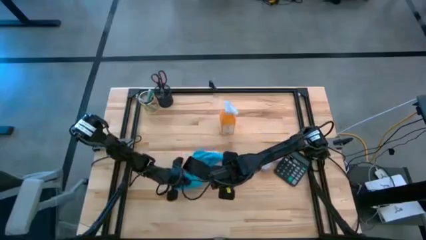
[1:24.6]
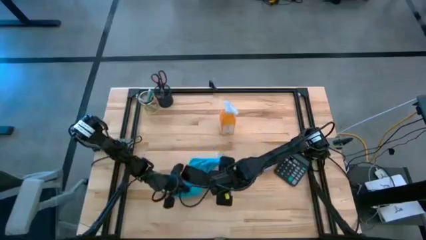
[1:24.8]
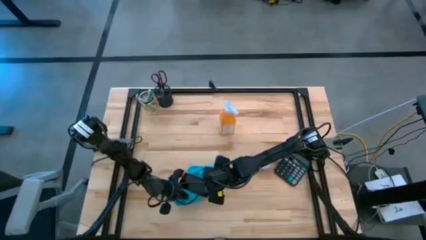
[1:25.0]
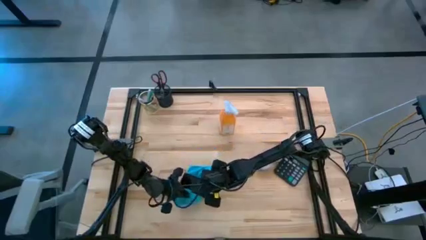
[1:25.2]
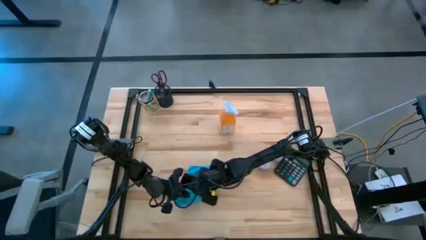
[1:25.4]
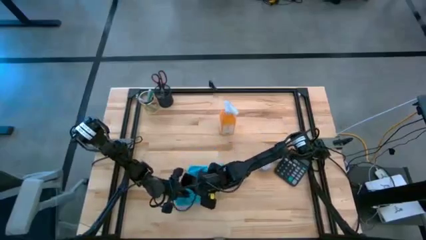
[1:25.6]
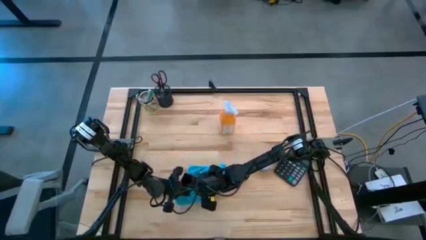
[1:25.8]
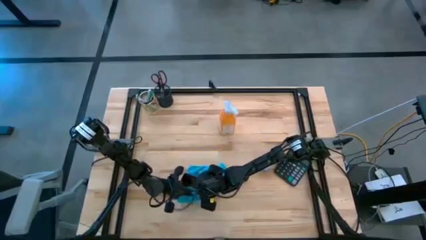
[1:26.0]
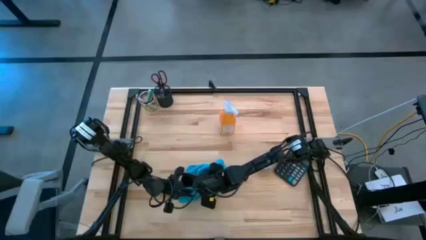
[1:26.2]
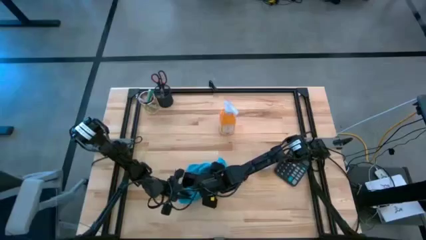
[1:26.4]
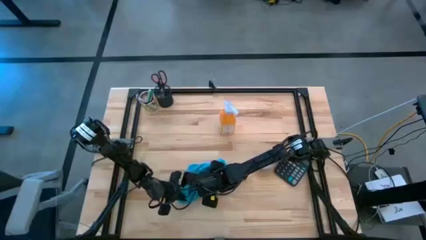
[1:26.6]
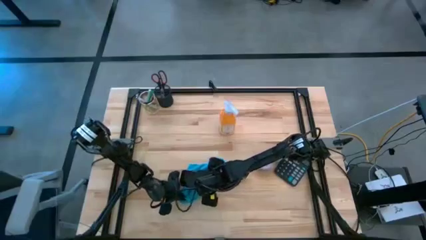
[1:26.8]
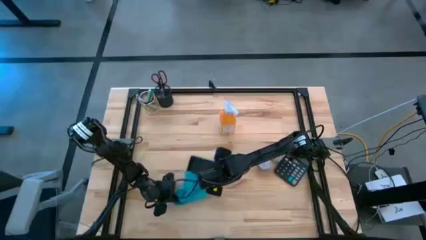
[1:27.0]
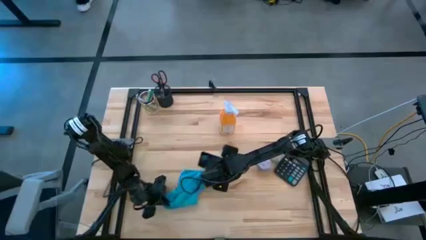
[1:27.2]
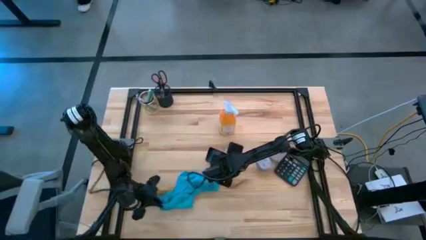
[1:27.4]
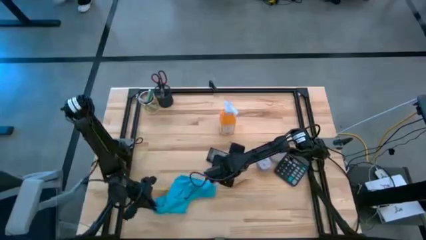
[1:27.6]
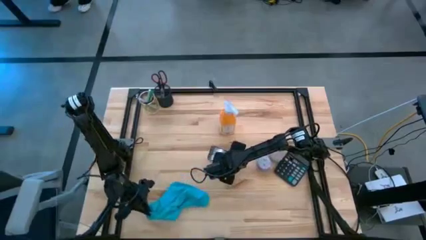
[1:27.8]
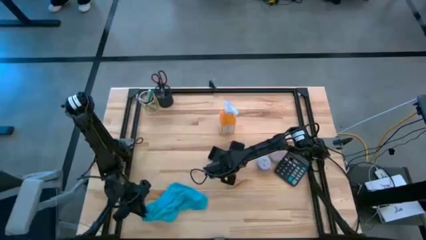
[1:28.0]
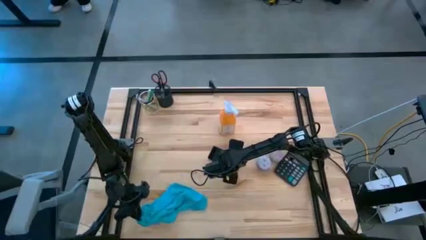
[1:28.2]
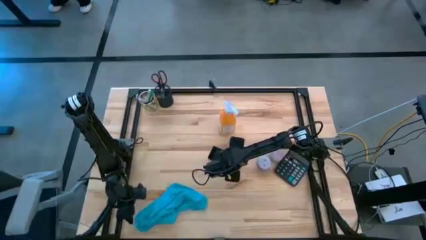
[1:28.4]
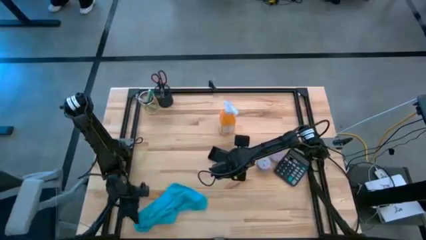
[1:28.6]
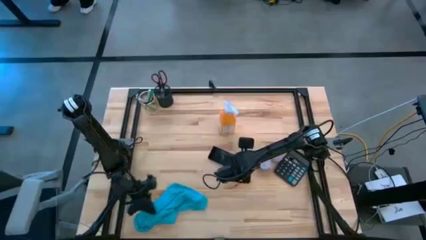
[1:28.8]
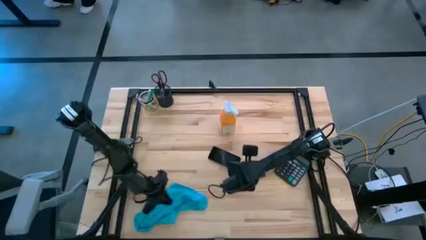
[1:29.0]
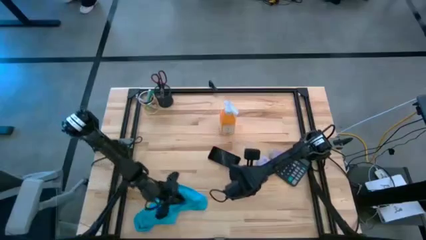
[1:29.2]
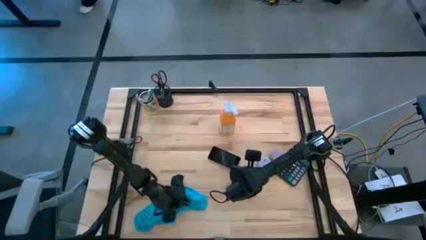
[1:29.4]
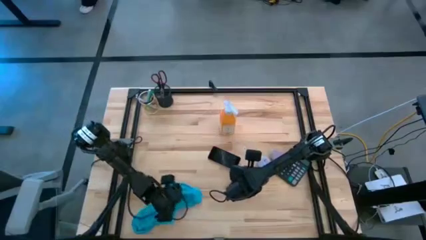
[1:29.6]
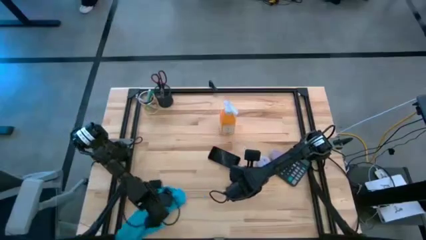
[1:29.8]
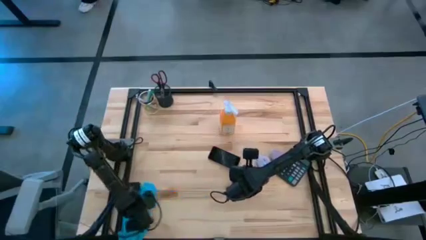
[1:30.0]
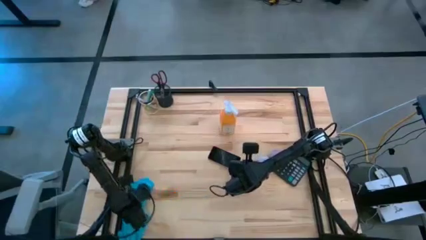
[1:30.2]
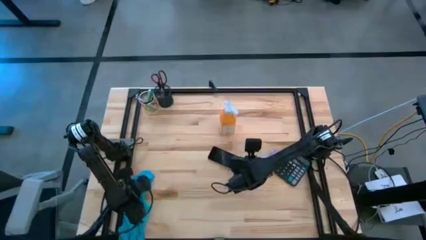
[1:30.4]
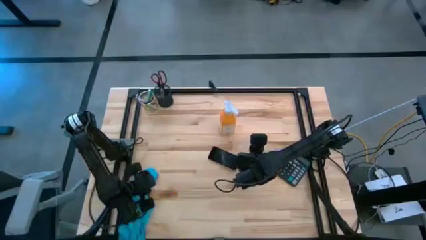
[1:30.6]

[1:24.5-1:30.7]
Task: Apply microfiber cloth
Move the blue microfiber towel to the bottom left of the table

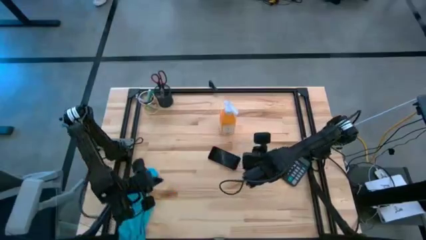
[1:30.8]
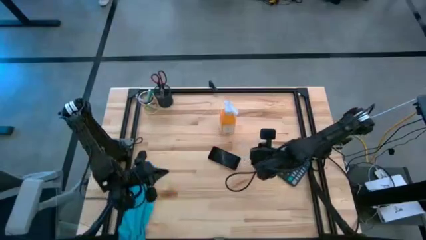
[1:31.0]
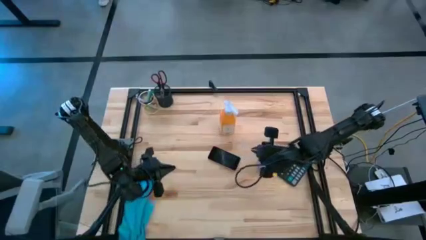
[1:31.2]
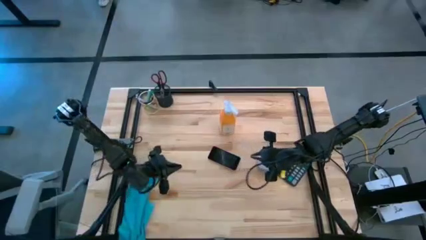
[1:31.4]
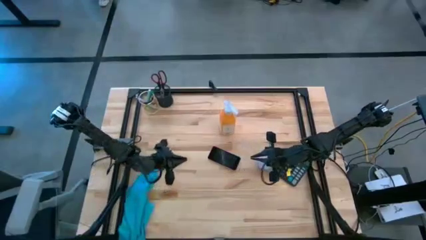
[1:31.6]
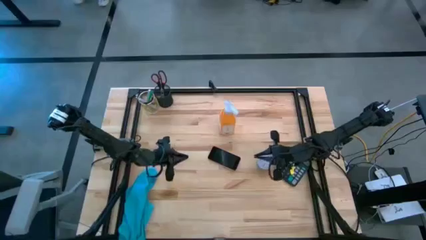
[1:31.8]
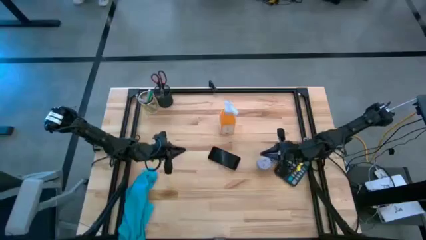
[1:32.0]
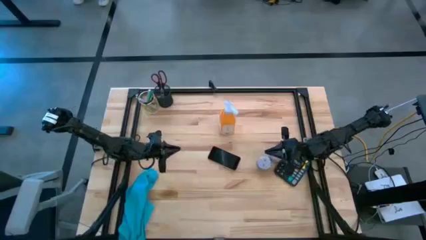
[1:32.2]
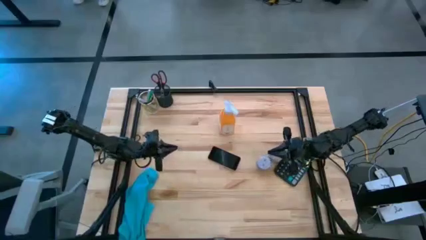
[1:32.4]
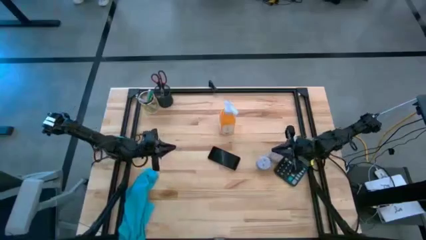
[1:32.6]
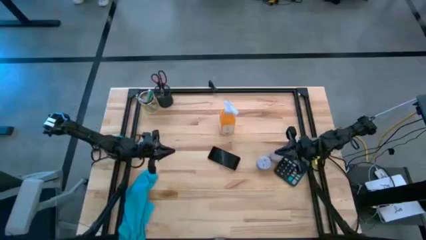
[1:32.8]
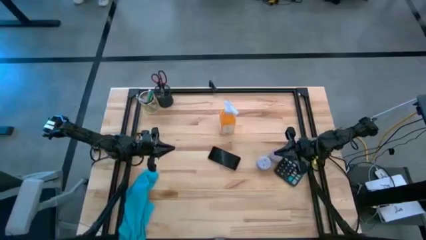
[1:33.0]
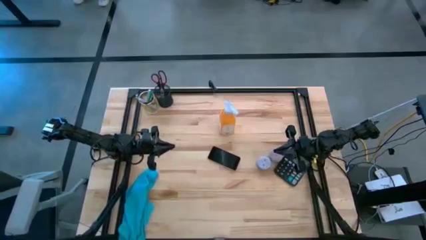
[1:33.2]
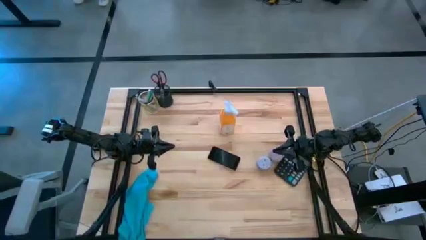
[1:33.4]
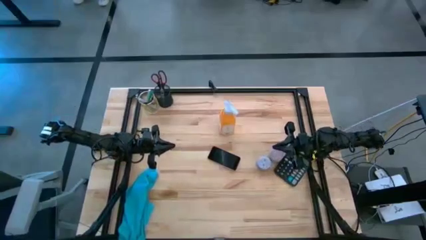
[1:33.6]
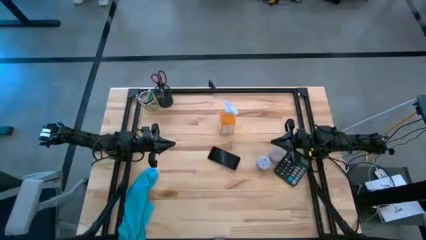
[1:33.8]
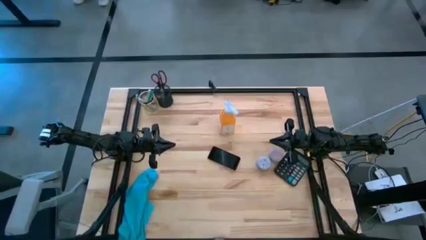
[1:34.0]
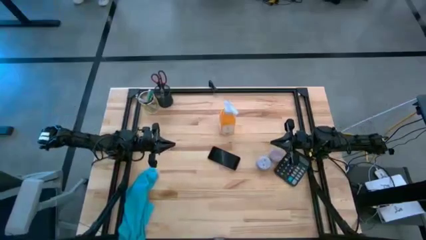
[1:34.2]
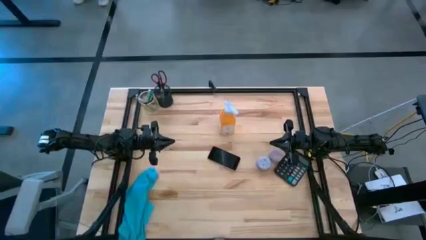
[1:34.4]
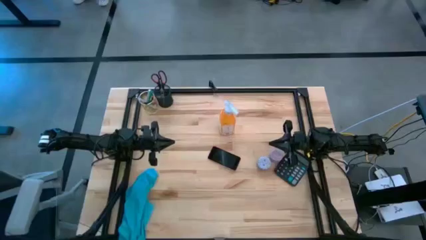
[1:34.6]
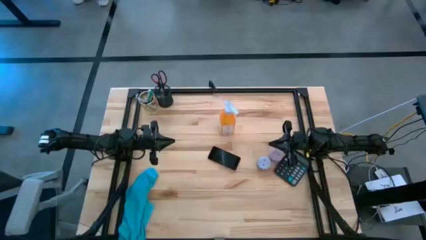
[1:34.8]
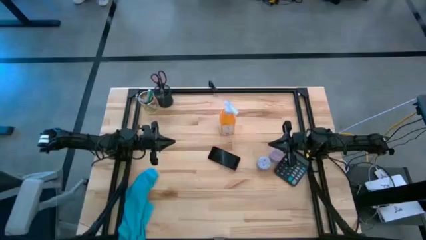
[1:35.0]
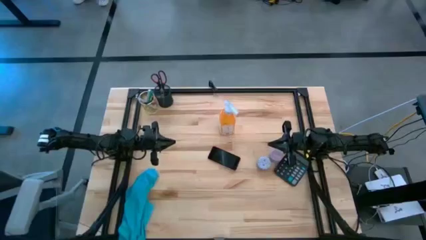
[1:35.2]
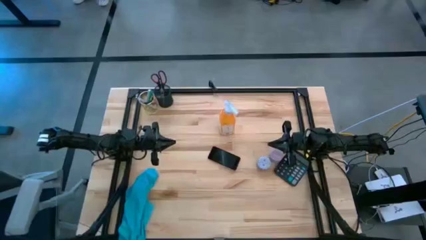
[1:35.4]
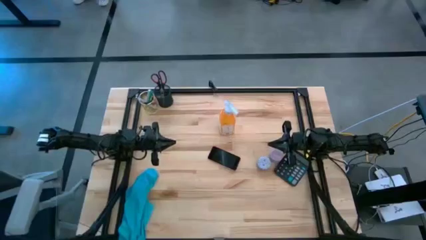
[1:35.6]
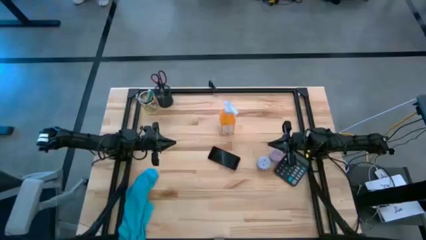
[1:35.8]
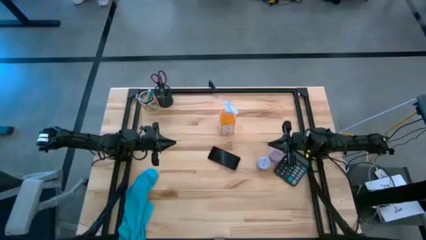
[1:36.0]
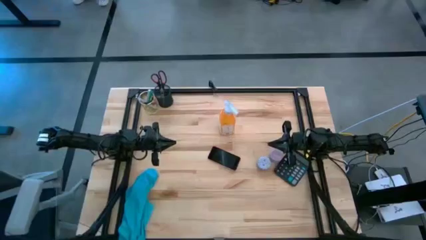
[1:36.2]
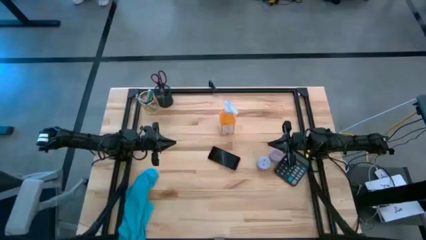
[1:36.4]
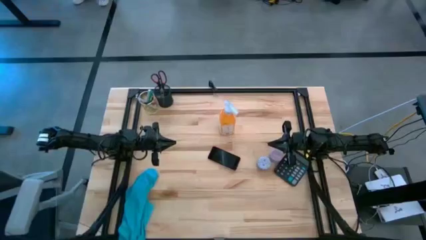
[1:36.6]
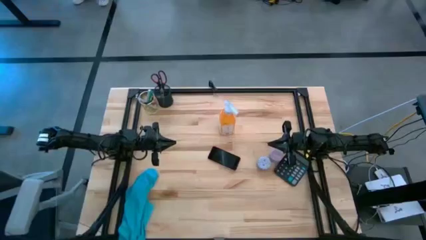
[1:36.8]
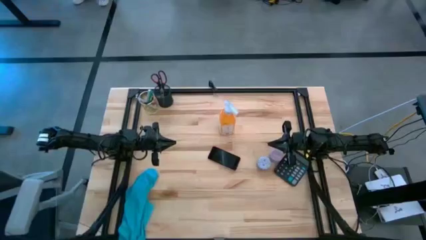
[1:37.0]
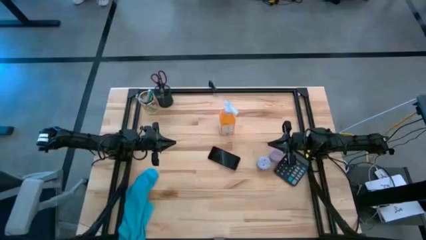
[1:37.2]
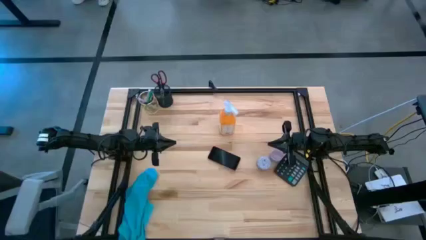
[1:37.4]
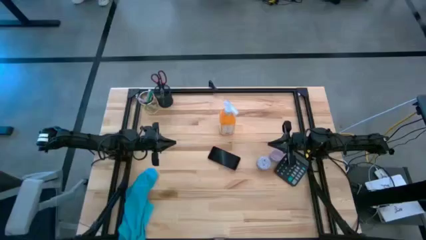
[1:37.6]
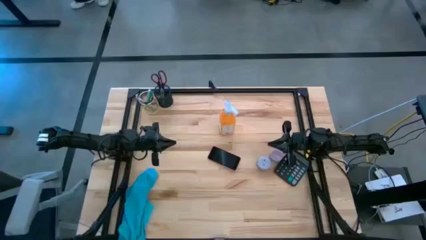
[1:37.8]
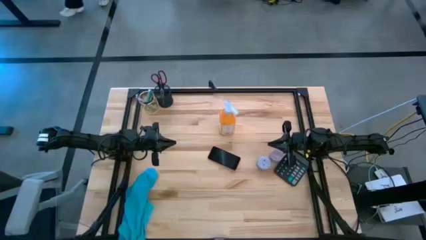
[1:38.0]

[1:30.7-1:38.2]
Return to Home Position

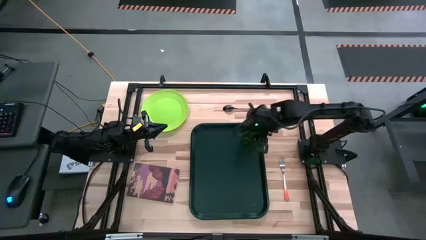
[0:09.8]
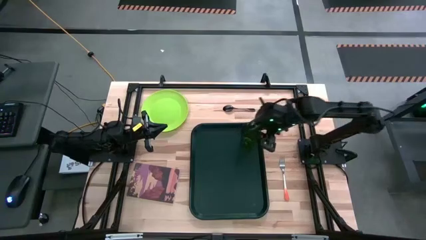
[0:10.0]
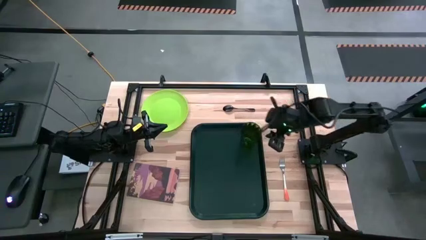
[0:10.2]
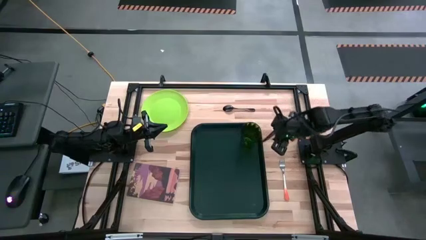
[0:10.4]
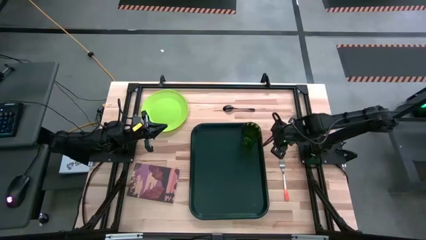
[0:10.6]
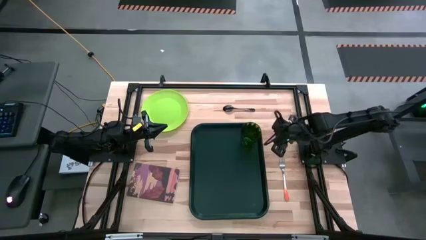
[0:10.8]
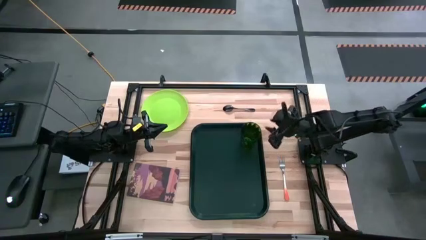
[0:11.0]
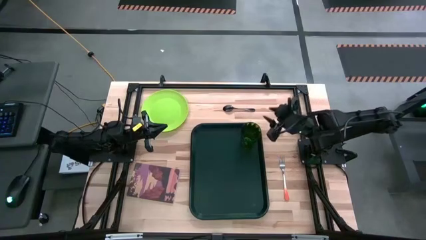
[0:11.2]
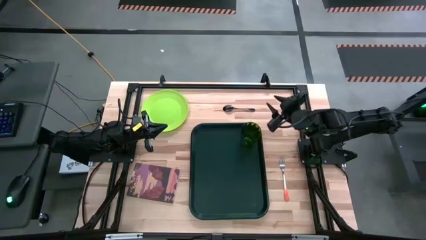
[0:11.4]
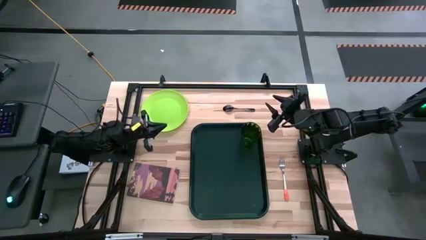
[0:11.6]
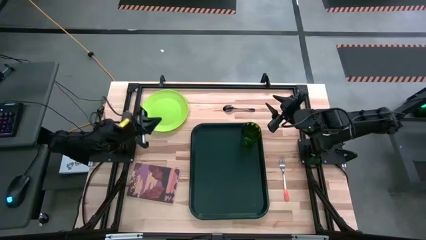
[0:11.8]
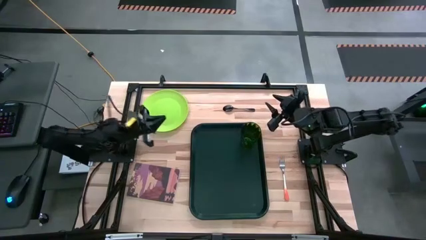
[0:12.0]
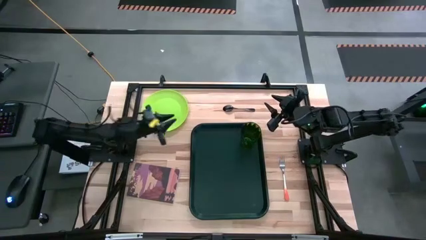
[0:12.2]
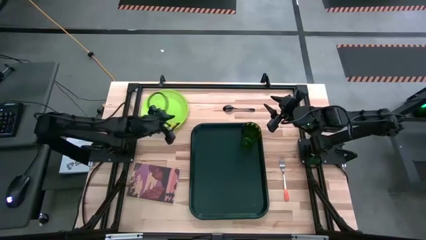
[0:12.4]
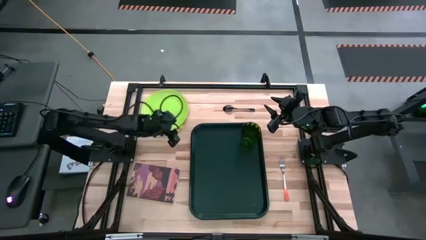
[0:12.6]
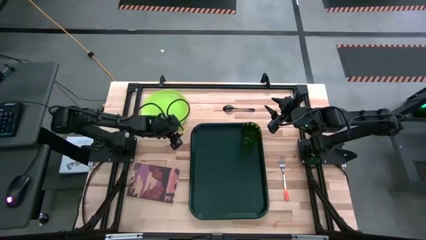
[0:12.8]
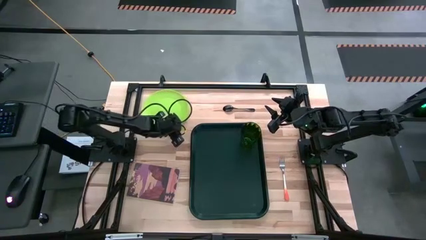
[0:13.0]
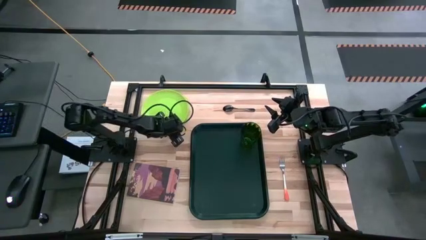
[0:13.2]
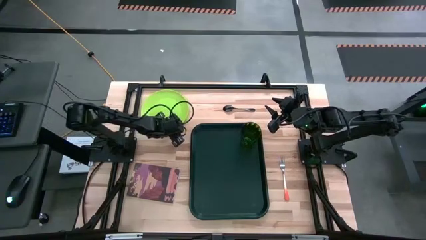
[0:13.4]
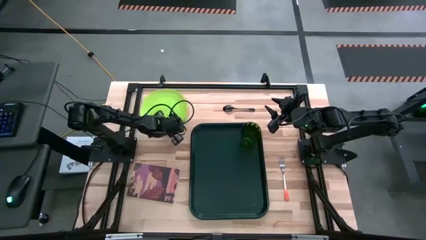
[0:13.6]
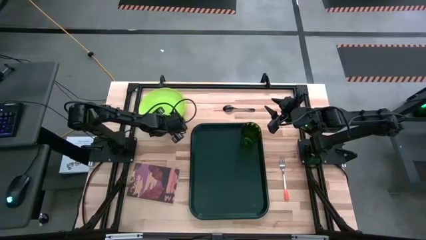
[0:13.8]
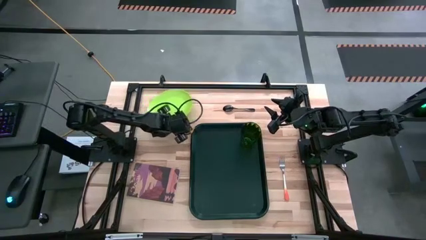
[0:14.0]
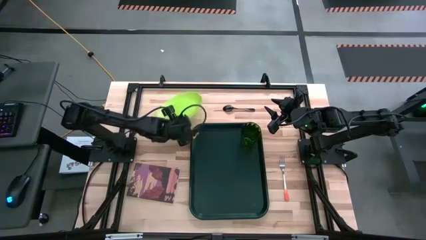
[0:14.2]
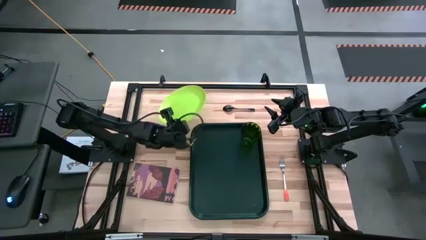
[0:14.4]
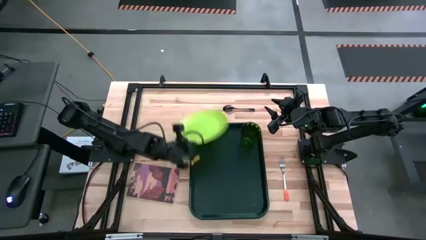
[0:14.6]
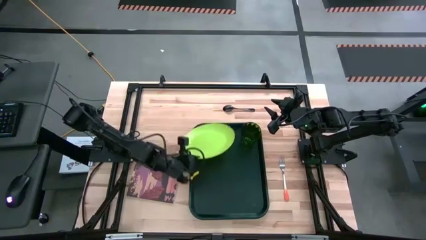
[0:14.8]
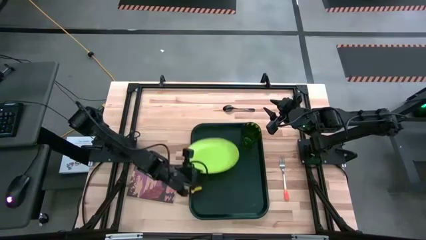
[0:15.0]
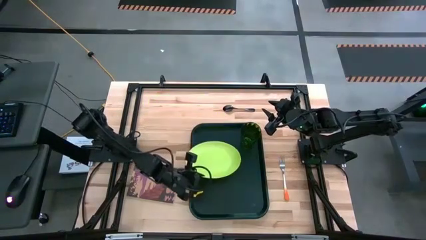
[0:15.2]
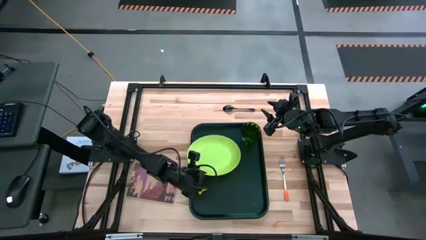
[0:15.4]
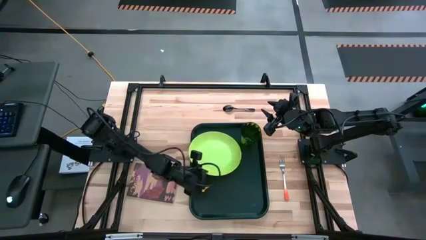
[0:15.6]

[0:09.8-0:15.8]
Task: Pick and place plate/cup/fork/spoon on tray
Put the green plate on the black serving tray to the bottom of the green cup
